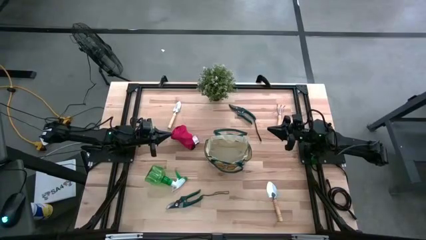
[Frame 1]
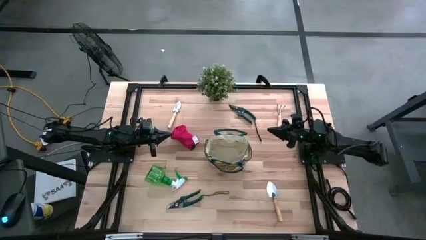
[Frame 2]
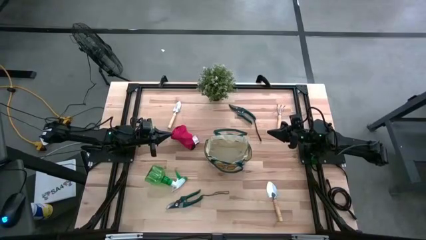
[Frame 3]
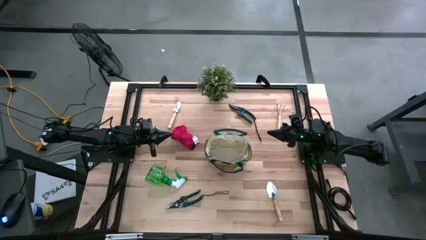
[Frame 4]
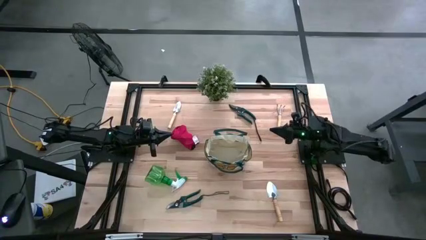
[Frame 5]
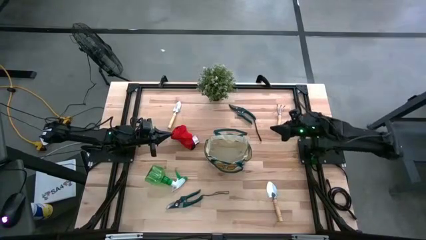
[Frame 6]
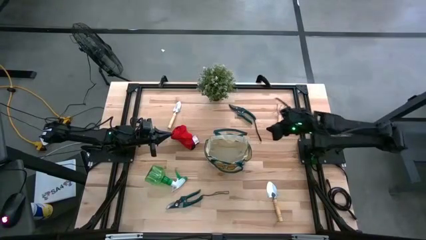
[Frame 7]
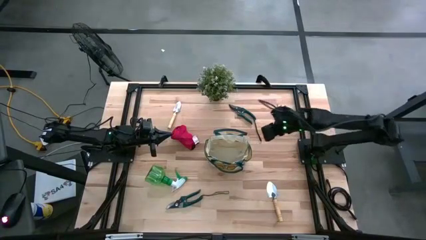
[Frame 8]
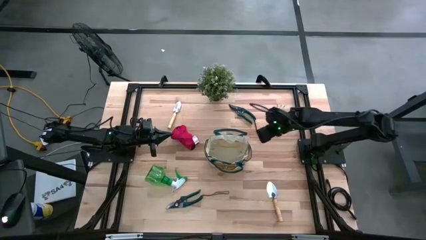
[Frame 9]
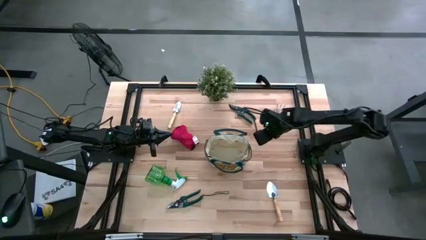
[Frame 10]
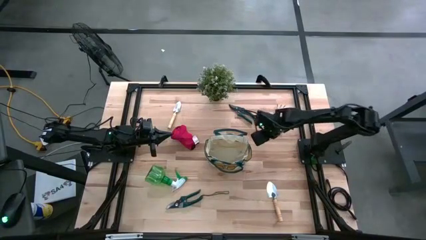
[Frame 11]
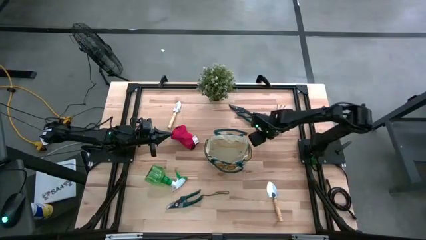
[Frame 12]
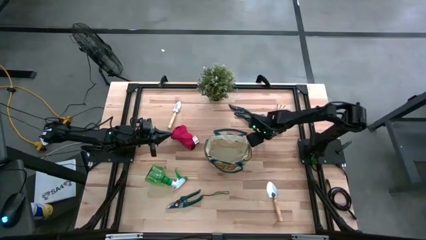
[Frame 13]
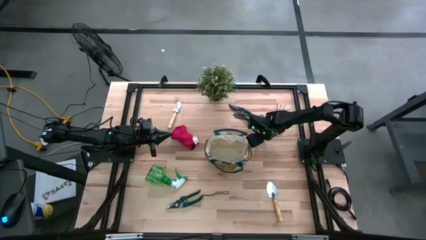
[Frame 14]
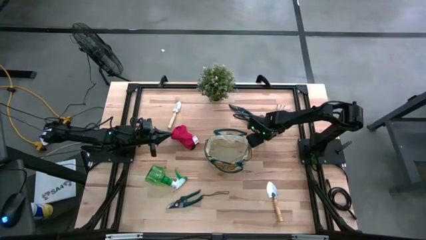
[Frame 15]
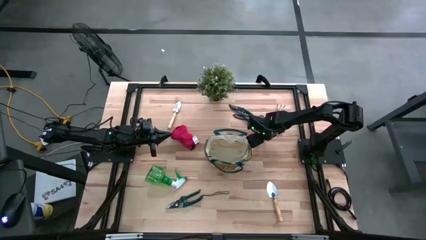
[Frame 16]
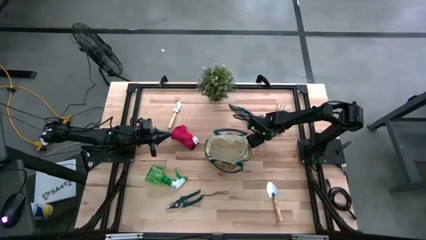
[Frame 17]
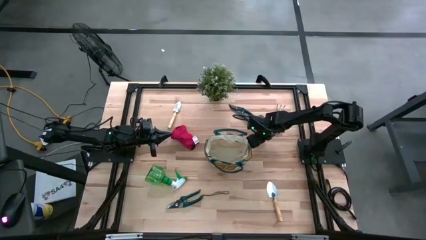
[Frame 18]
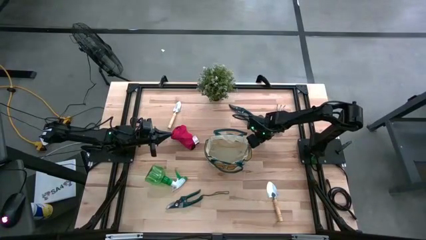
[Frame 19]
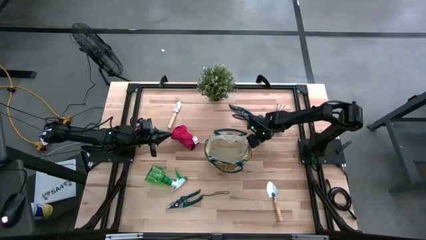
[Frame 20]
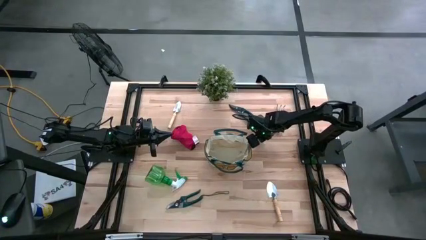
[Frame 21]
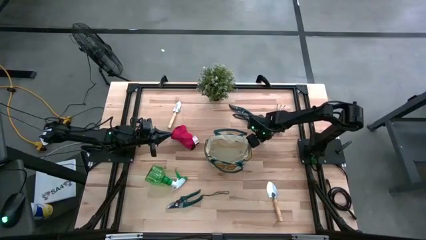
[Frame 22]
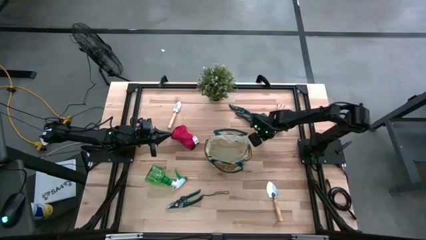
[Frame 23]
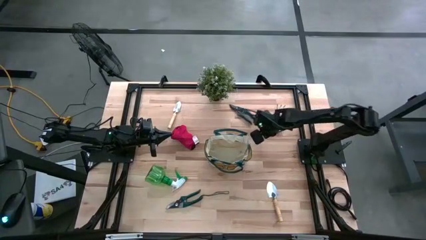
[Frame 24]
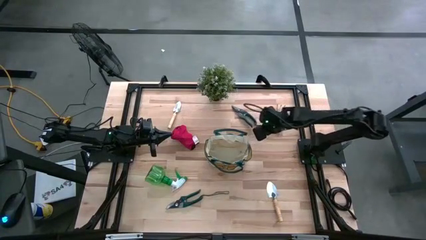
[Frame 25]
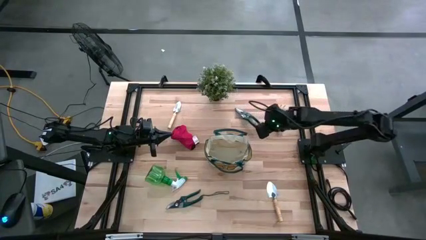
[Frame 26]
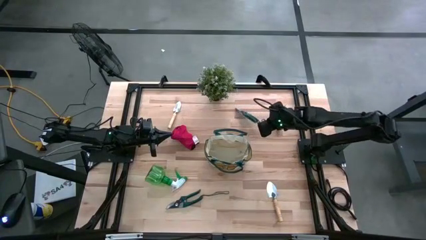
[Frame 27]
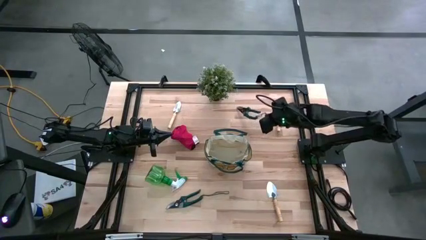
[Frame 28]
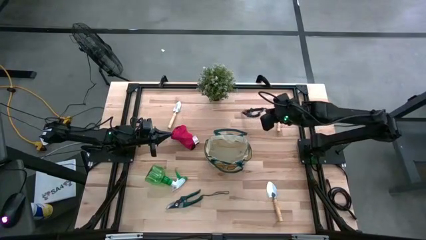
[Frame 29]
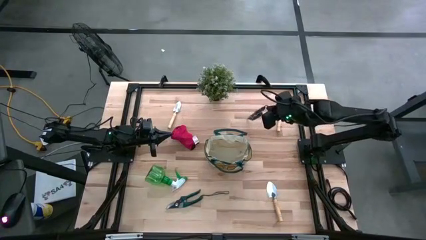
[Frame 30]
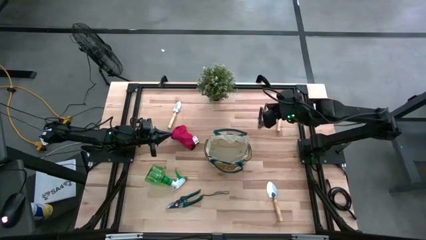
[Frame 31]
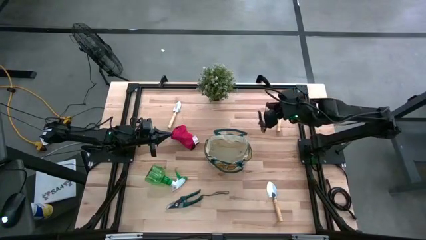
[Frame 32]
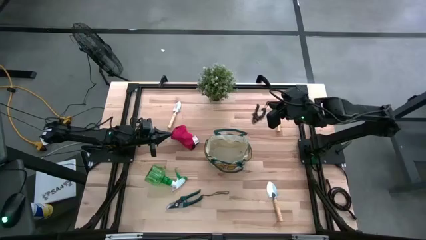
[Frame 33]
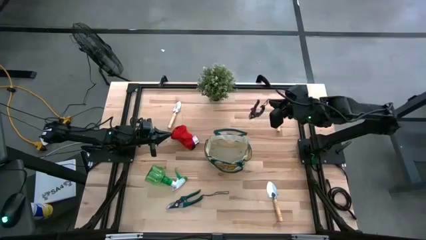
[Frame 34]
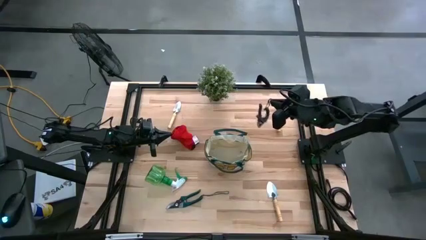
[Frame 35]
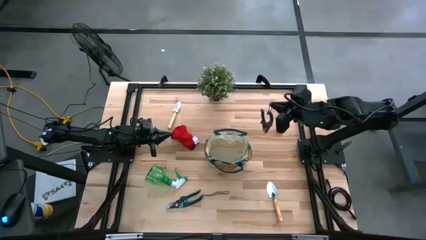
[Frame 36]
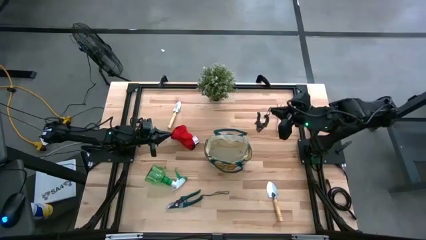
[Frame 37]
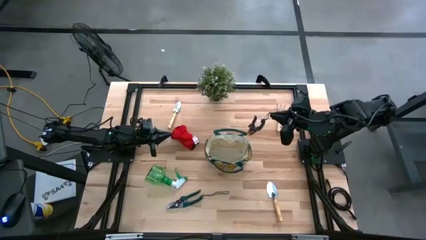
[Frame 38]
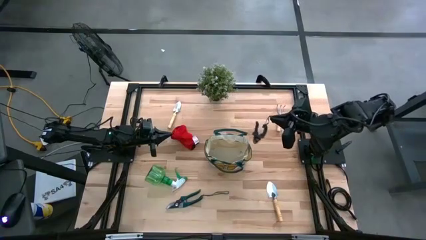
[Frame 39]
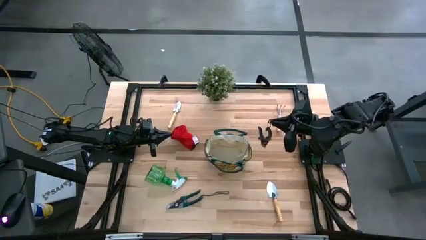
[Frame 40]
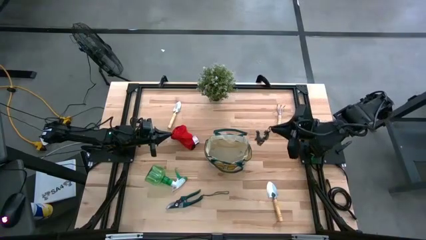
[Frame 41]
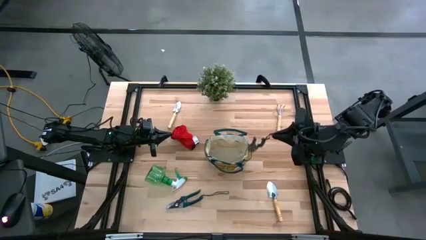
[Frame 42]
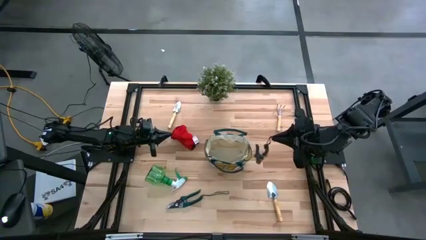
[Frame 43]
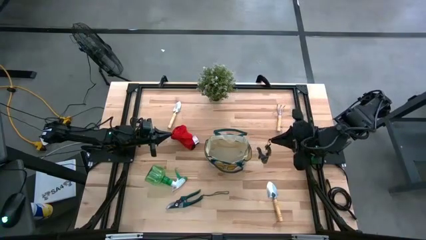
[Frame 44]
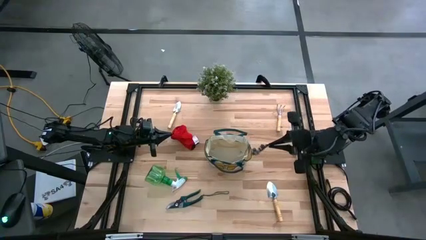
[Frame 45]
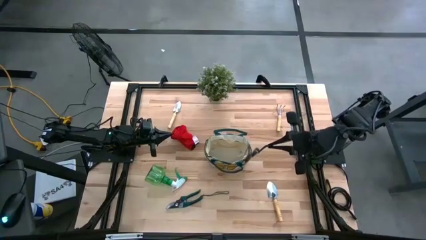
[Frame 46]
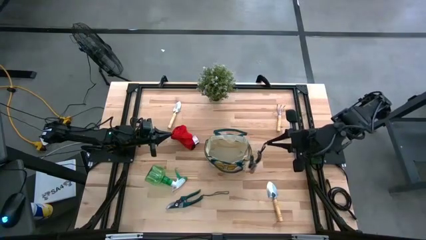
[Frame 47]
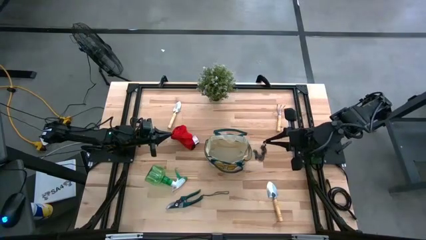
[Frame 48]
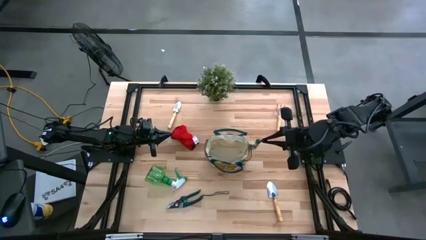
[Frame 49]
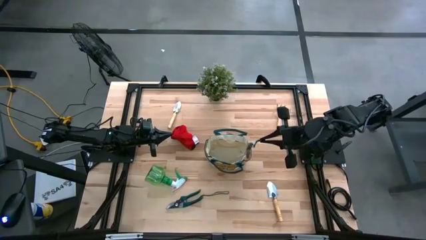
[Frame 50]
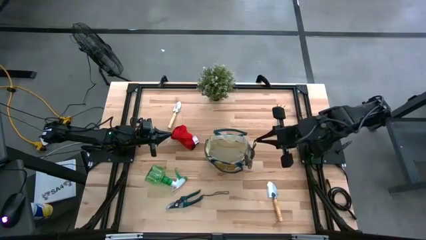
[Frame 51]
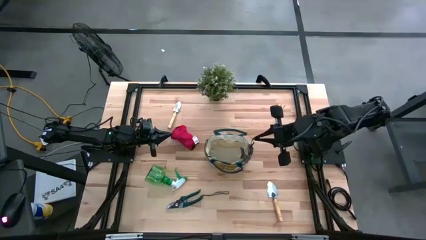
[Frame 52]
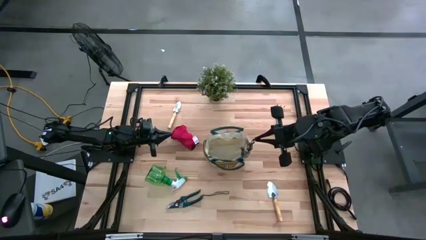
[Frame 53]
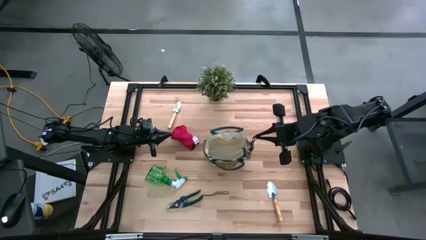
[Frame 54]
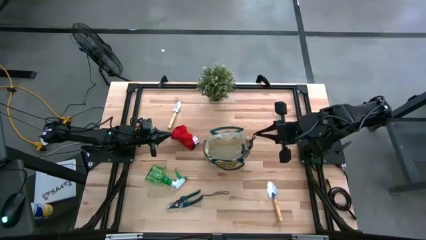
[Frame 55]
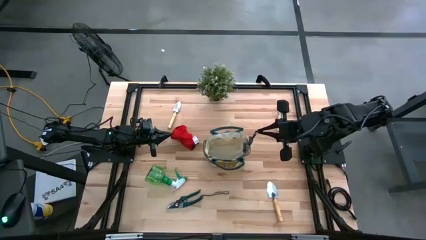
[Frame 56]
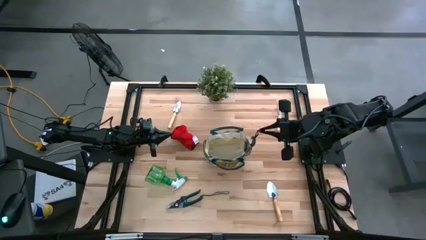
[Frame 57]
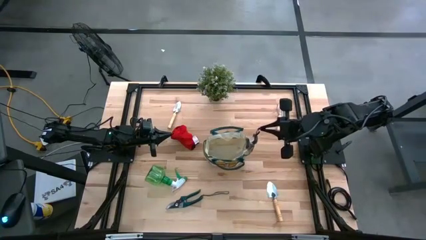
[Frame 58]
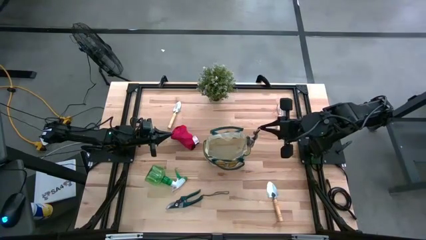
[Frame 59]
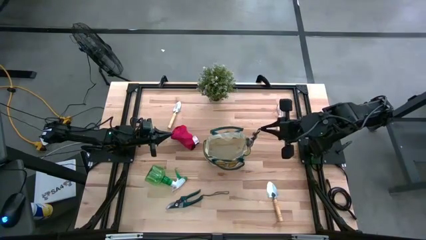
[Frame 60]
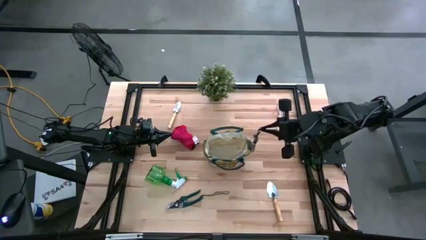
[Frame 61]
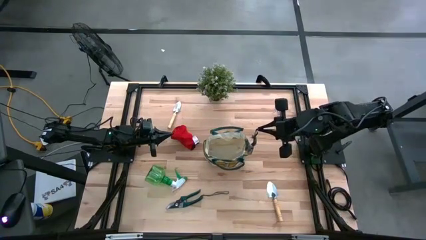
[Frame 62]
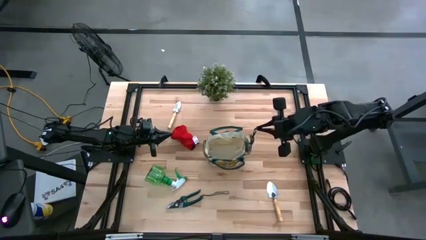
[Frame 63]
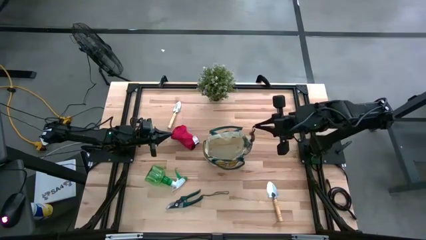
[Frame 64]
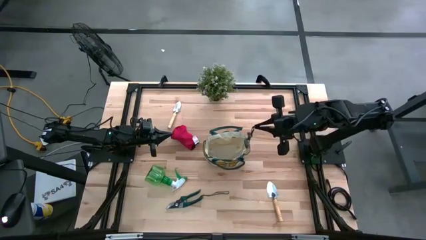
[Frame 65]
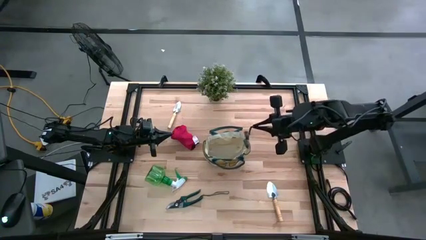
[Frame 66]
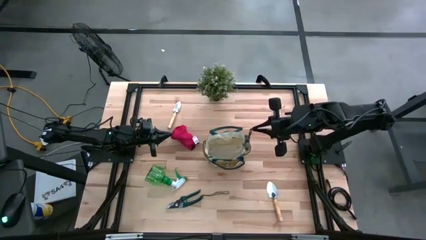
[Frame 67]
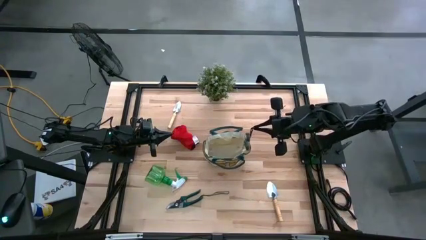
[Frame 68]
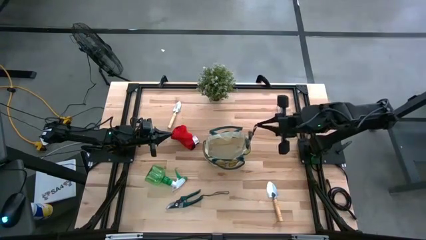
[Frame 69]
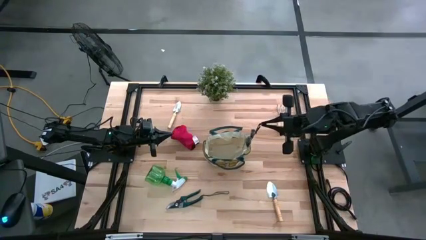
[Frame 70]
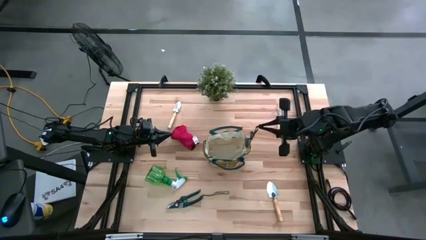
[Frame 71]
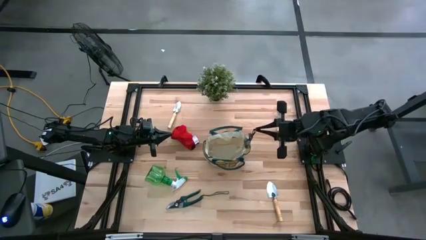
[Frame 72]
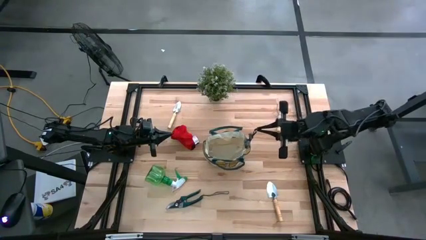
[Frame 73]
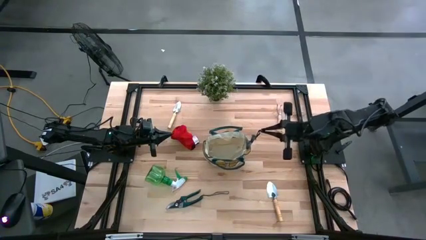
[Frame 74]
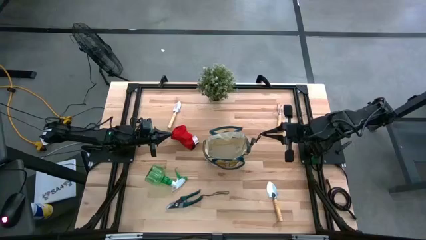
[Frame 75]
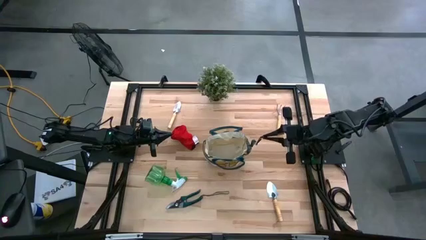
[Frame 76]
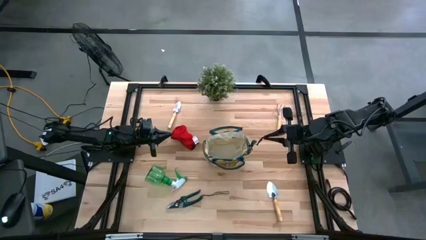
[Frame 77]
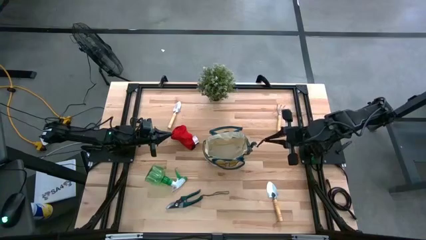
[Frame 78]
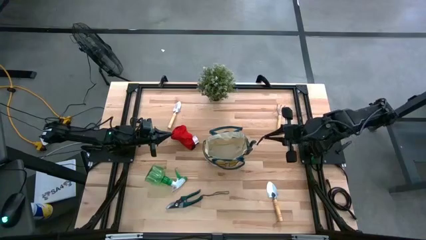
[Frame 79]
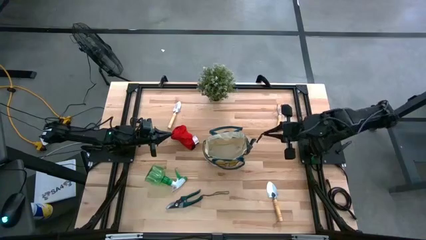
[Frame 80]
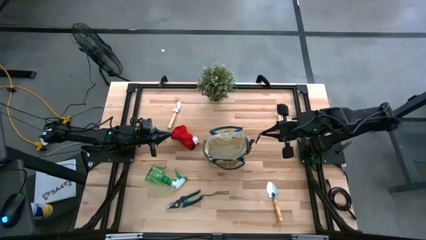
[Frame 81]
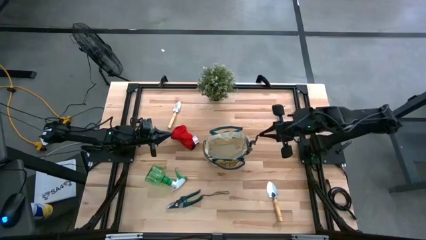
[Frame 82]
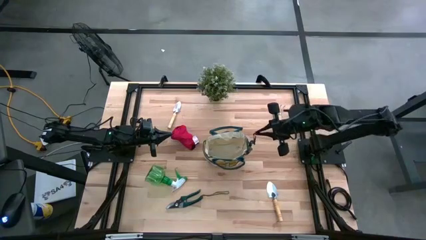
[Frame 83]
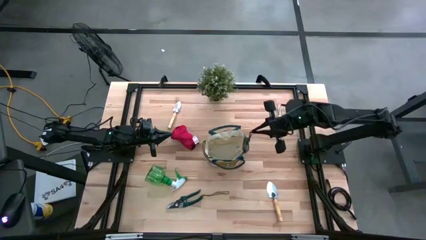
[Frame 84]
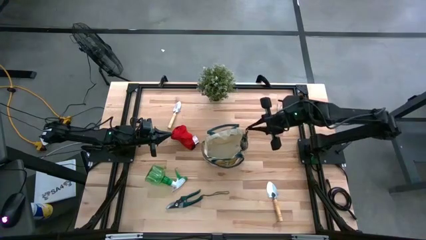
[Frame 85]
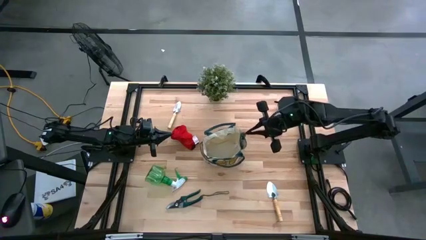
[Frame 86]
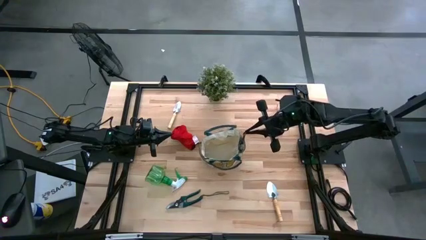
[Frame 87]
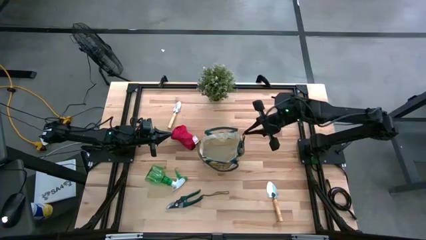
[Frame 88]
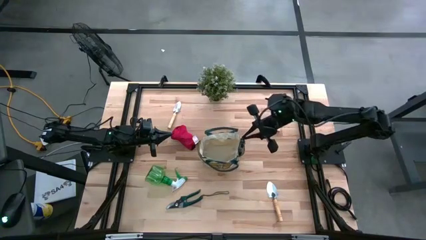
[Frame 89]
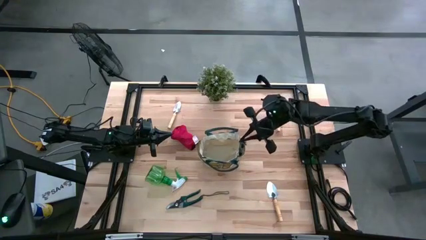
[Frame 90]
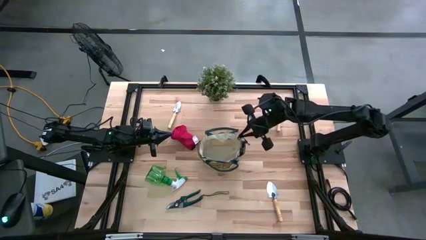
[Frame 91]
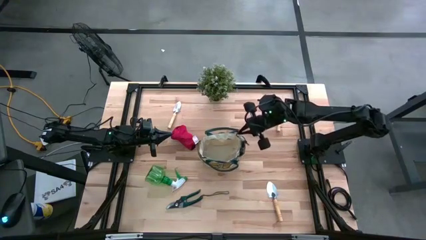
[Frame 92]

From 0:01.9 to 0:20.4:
Task: Pick & Place Garden tools in Gardening bag
Put the top shear scissors into the gardening bag
